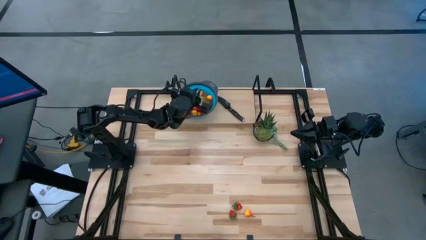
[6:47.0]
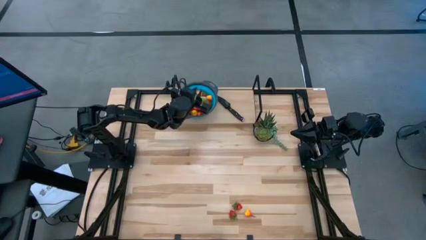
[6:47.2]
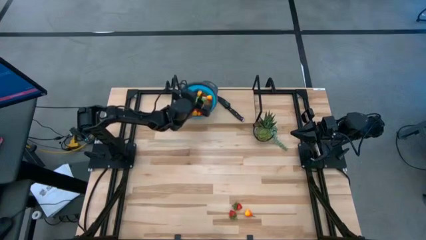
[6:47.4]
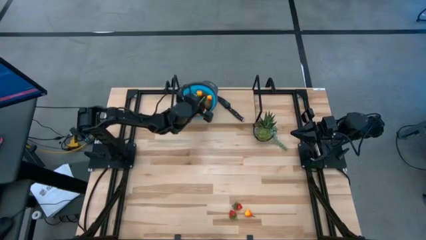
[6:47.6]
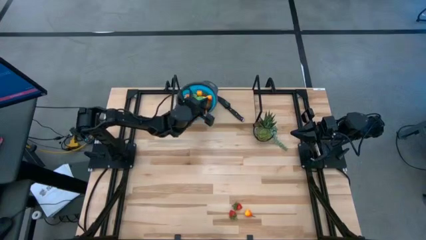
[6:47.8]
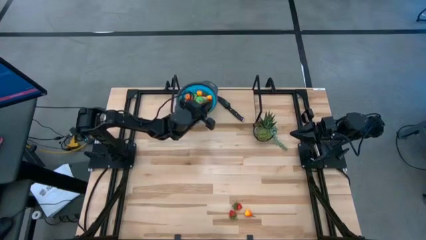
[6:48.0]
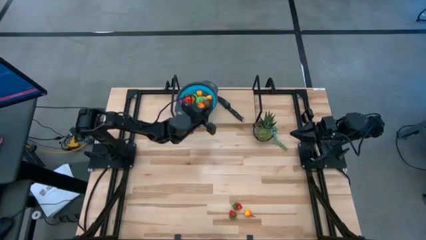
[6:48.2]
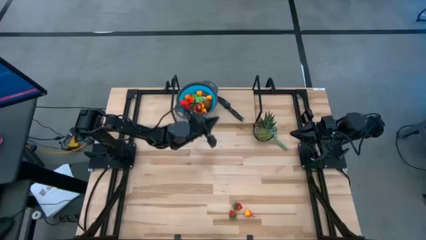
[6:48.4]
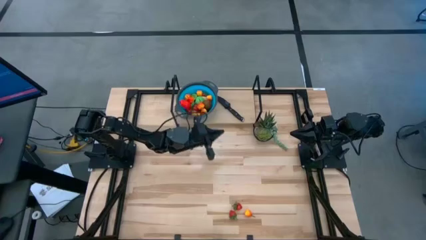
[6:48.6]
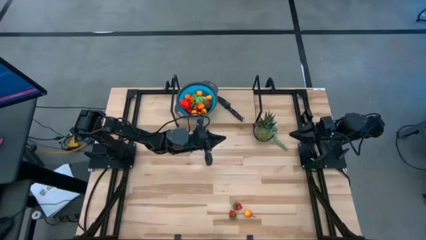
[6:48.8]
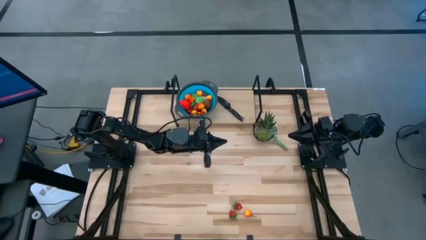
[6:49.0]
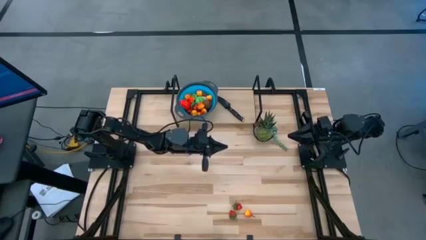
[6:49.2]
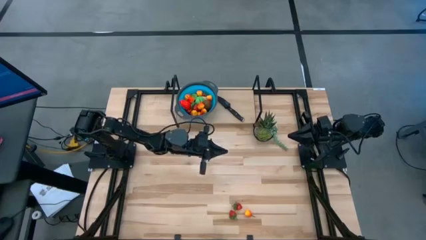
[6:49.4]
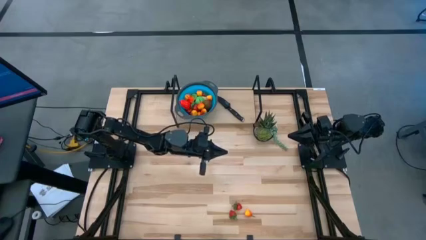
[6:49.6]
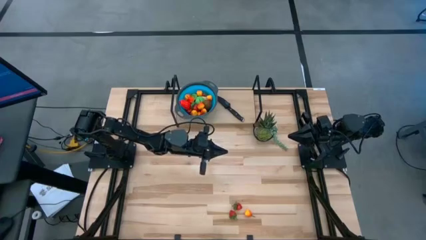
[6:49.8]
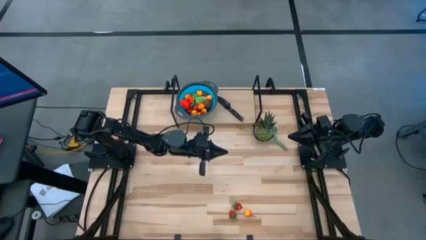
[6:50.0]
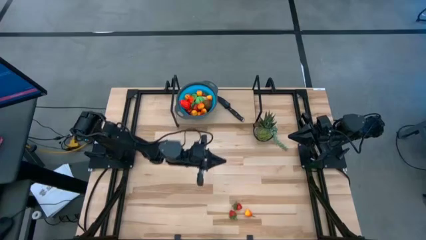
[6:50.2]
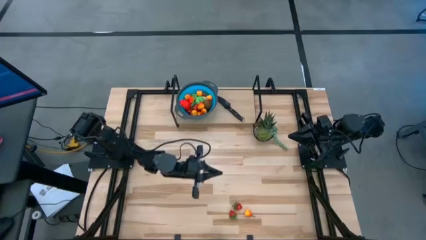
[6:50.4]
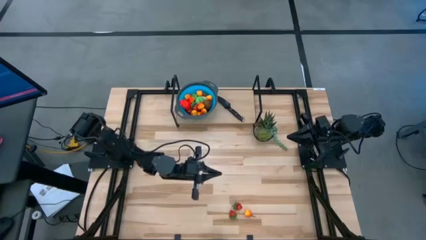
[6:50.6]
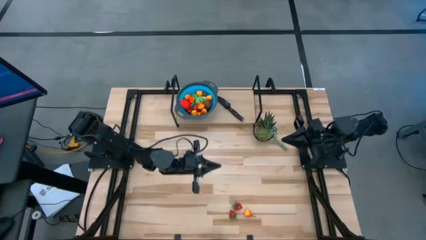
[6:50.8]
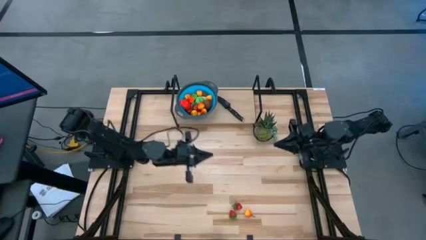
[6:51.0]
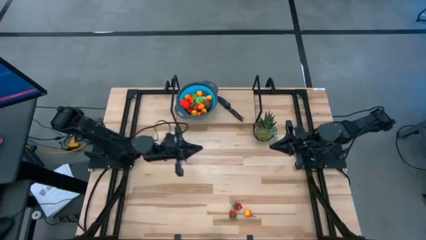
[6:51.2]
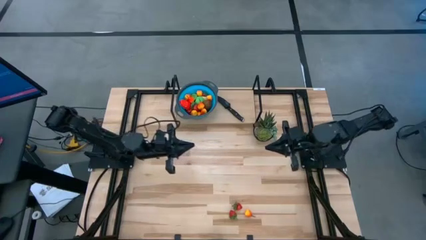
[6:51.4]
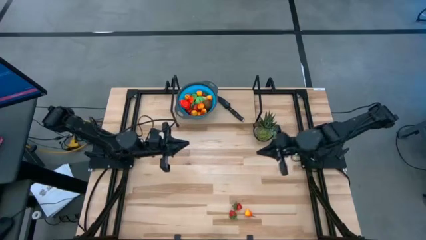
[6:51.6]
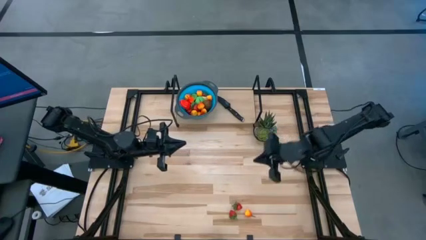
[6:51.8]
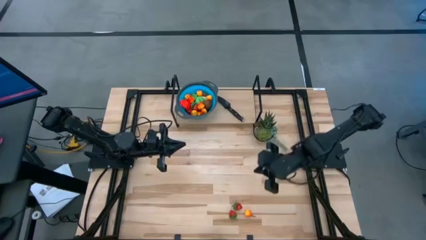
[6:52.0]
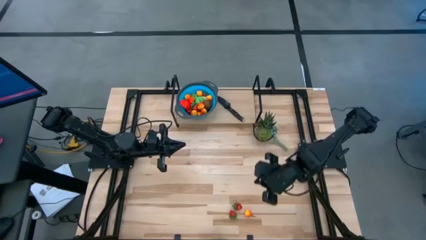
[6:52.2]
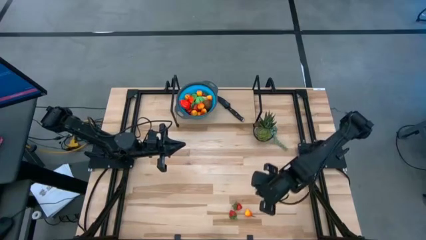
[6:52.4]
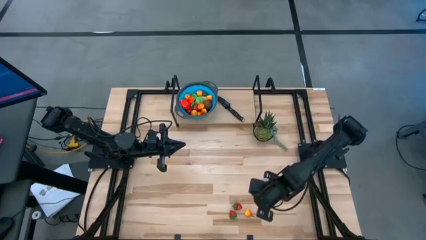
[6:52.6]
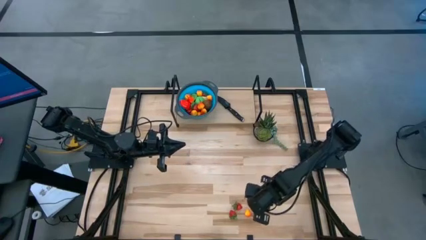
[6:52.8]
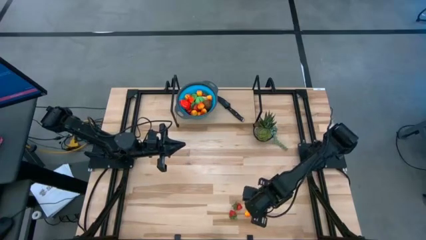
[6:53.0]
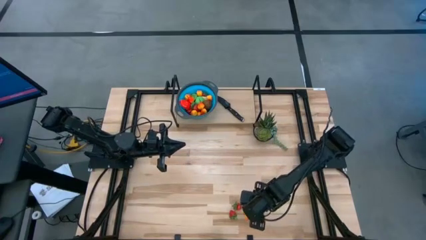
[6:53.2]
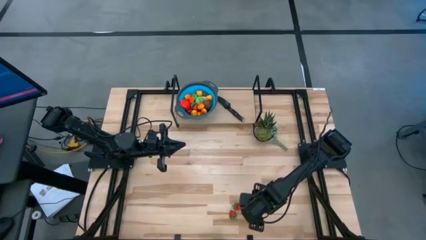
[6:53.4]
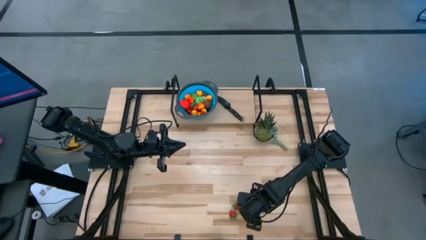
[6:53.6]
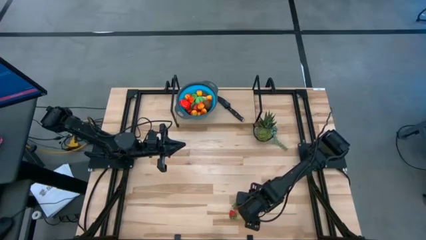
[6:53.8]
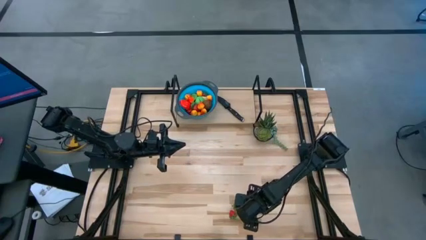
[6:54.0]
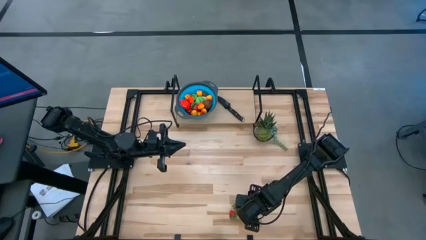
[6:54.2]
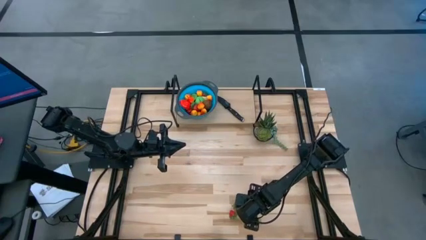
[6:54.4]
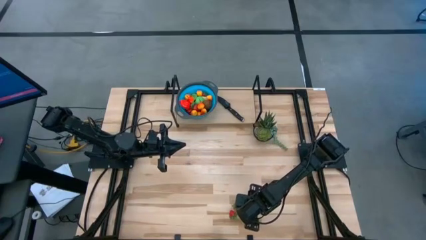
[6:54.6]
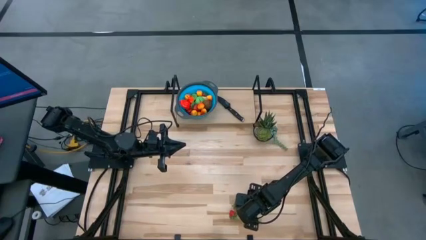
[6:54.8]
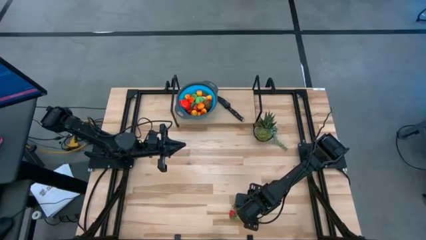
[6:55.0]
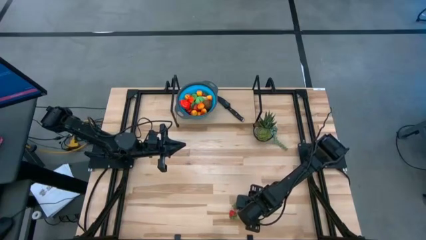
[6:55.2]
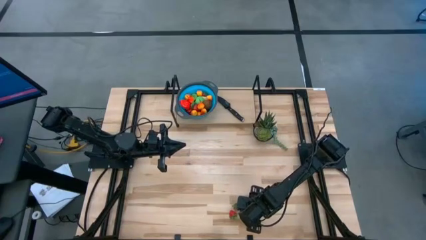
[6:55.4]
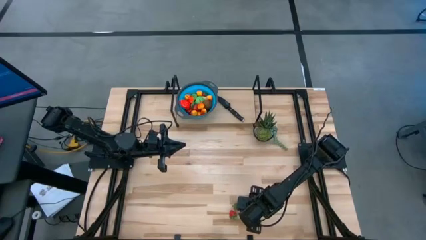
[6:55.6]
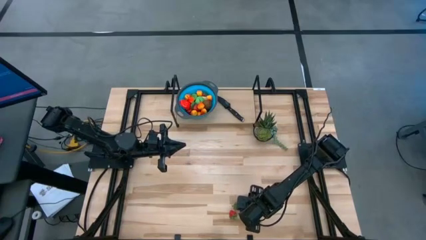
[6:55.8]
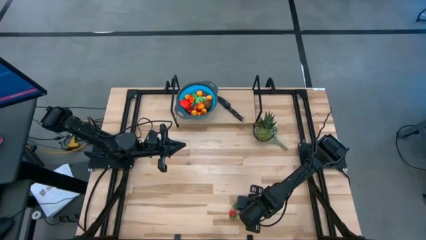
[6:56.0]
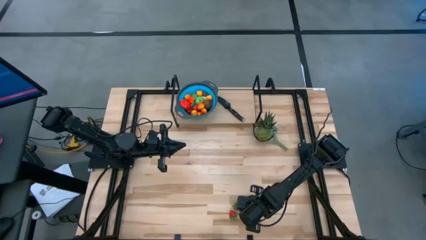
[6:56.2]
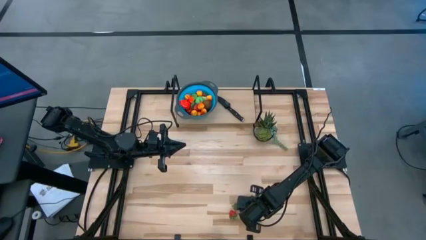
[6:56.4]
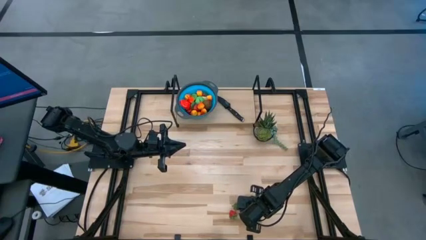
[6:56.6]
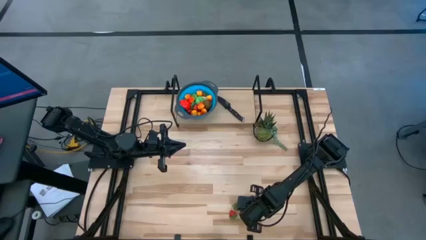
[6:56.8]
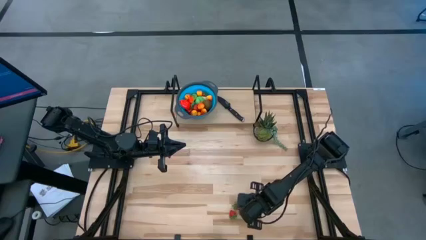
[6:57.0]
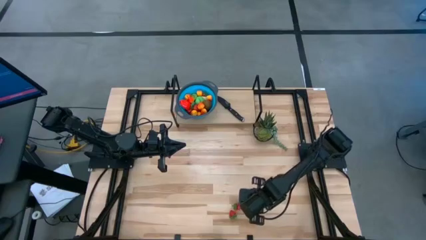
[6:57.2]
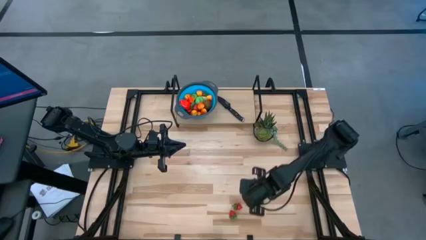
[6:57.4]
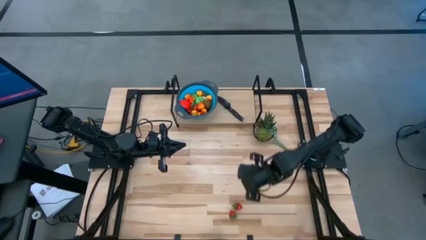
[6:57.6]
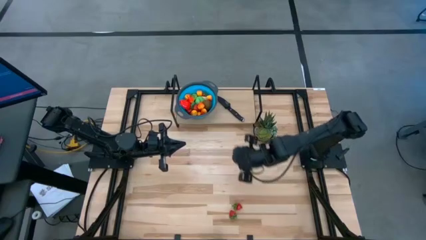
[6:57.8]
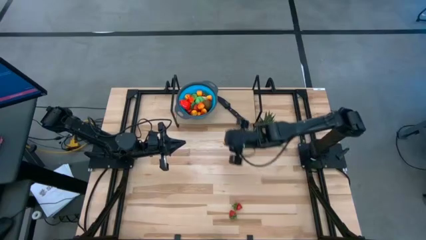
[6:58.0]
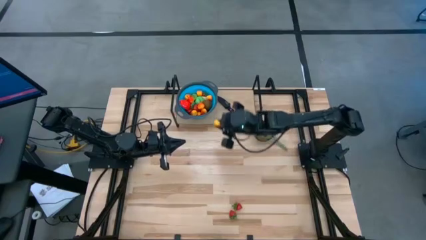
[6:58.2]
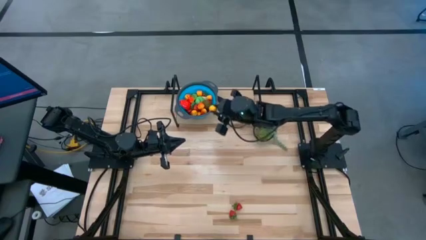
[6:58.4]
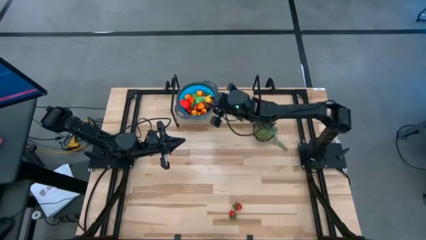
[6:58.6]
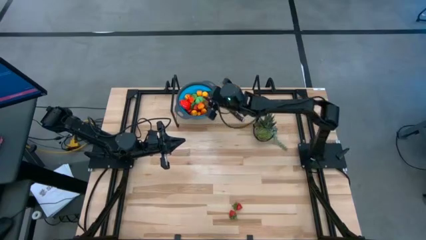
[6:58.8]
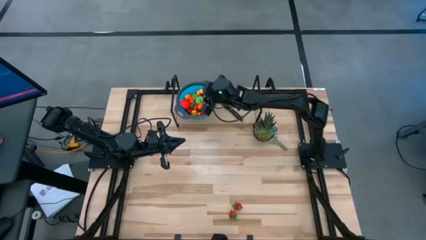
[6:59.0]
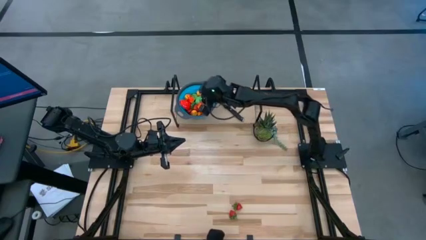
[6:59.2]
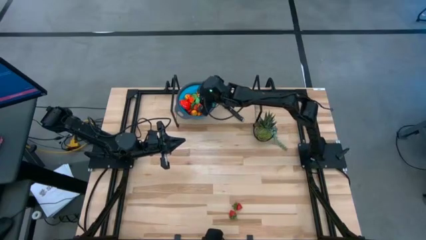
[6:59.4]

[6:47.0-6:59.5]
Task: Pick & Place Fruit
Put the pear into the basket

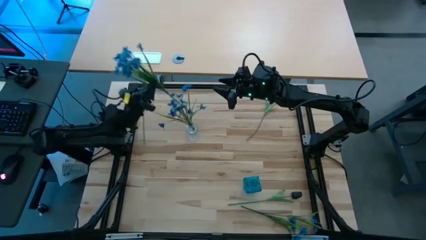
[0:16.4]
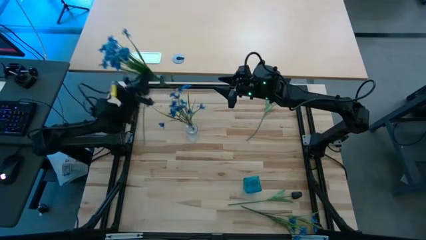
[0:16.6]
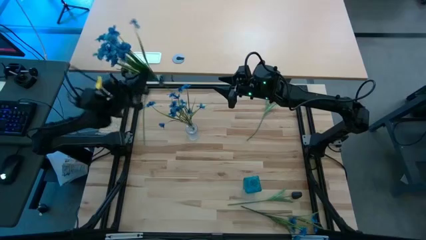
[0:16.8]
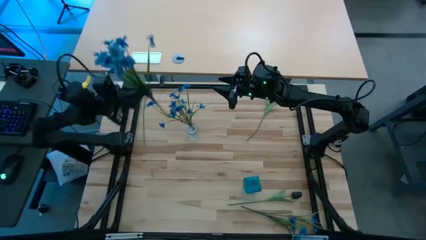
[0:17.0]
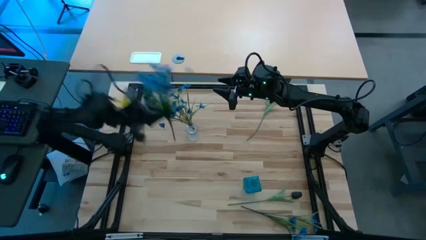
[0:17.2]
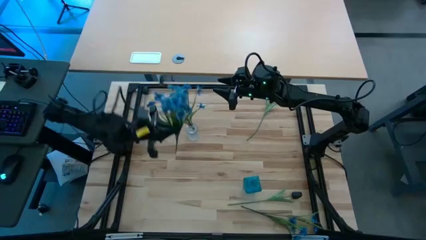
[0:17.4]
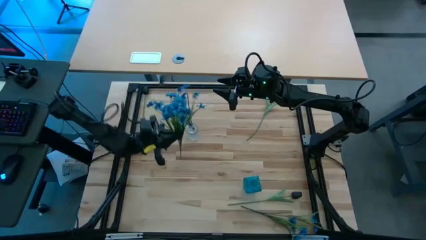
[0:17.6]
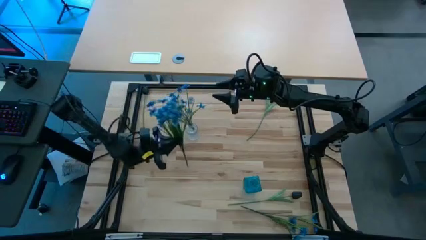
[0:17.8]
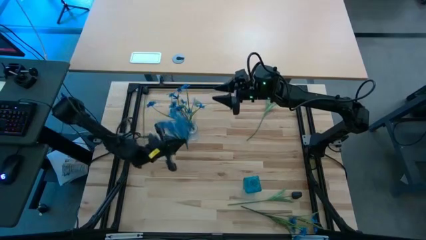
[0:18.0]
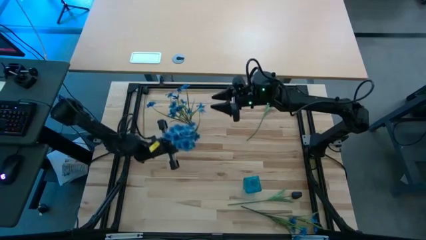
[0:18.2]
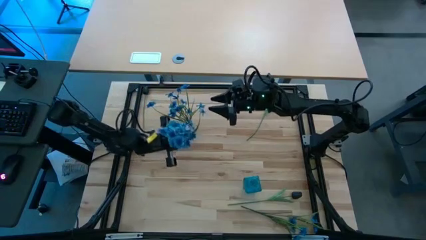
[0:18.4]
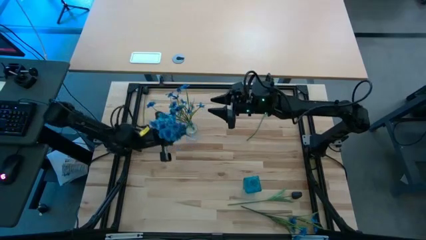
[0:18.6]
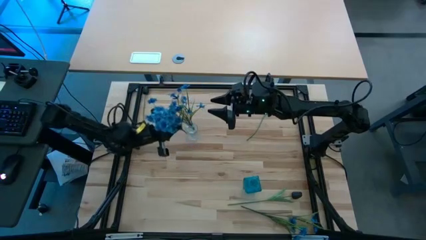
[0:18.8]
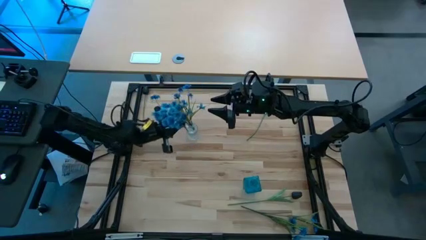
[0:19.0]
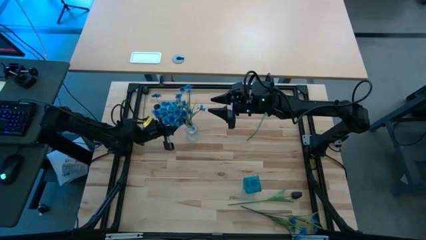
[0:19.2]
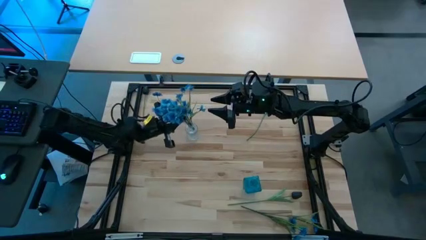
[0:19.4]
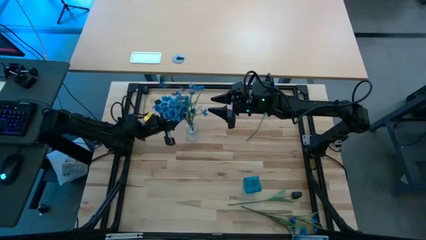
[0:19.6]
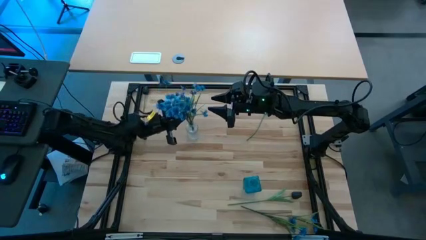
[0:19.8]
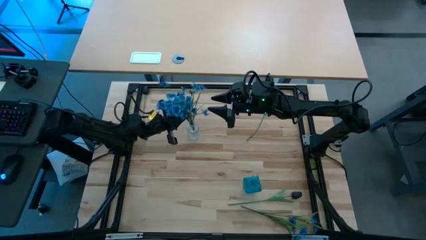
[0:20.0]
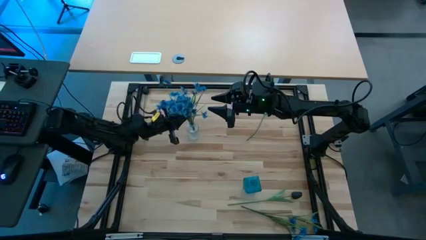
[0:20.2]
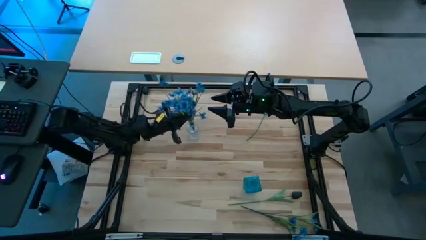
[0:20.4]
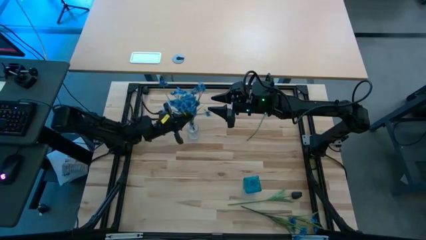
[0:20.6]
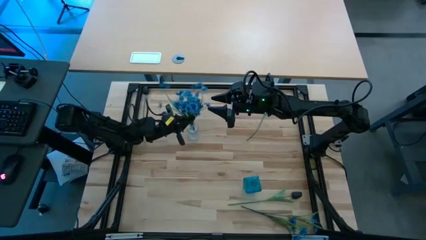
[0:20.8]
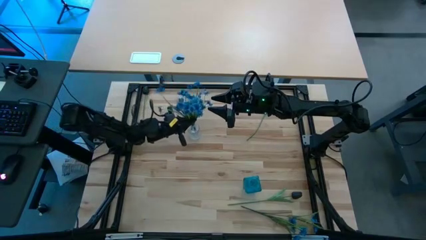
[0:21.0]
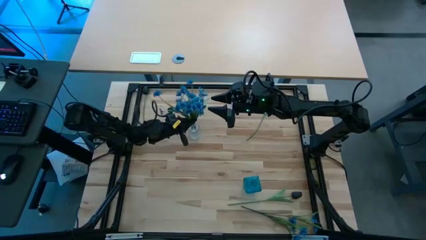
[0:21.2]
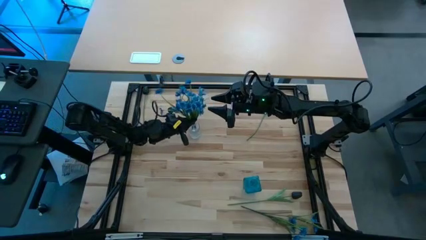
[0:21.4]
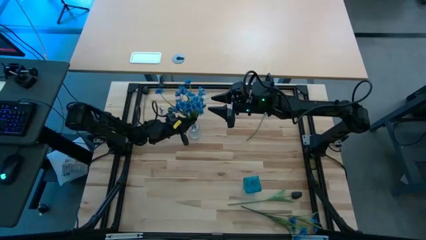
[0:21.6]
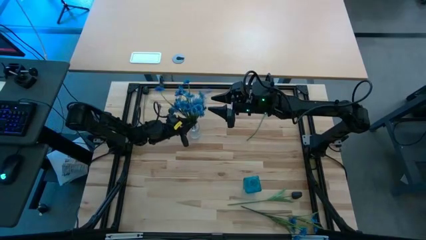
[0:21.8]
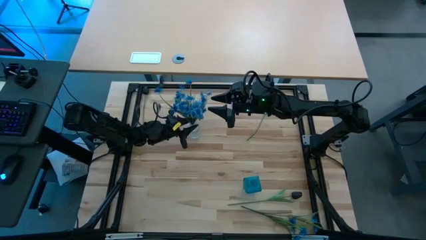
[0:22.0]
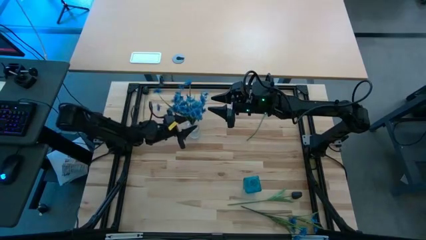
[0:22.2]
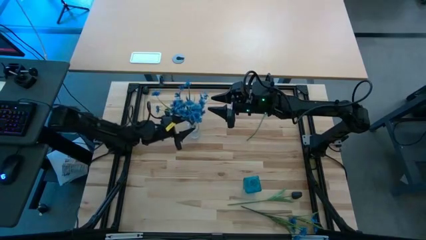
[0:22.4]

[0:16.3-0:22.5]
Task: Sort flowers into vase by color
Put the top light blue flowers into the transparent vase
